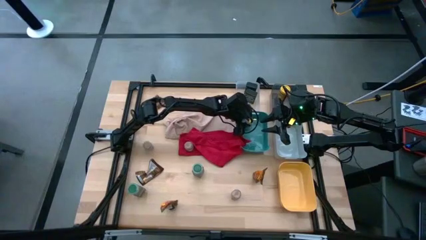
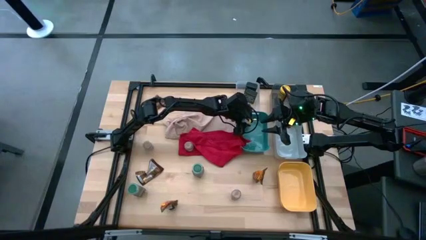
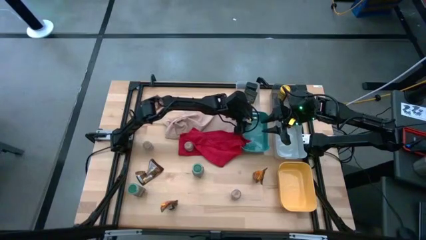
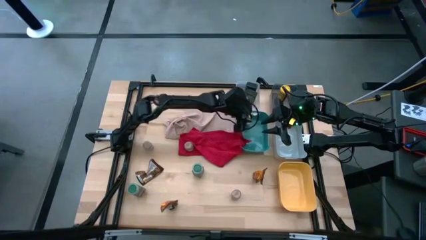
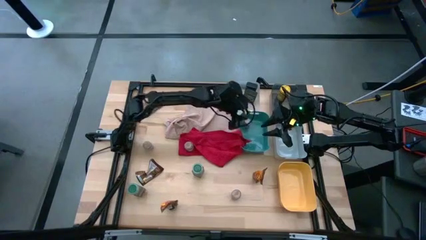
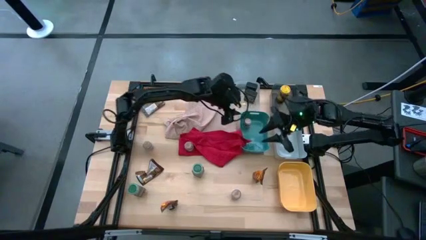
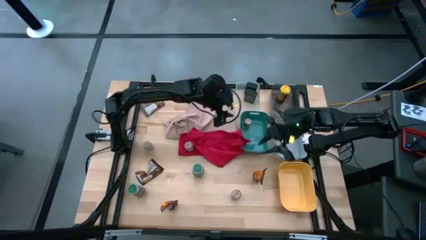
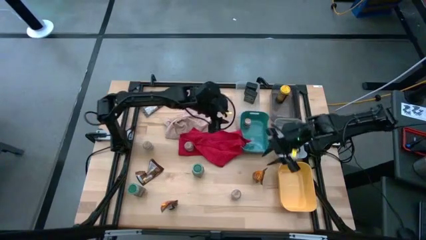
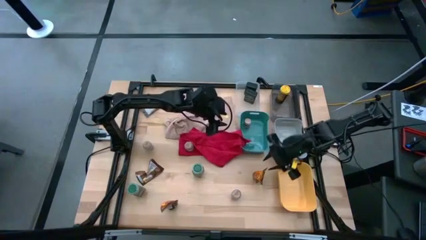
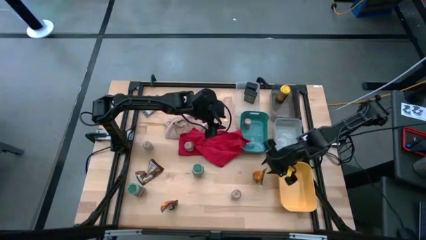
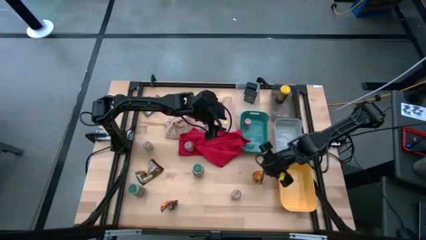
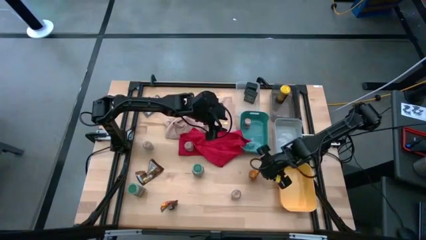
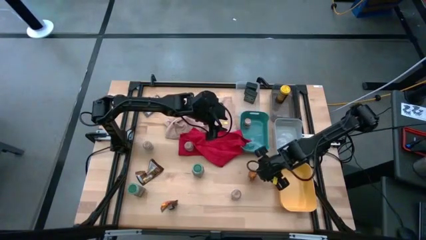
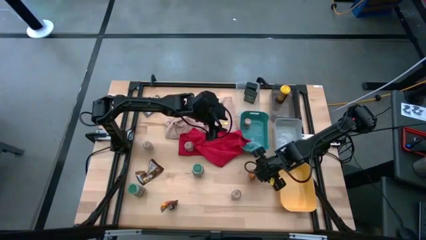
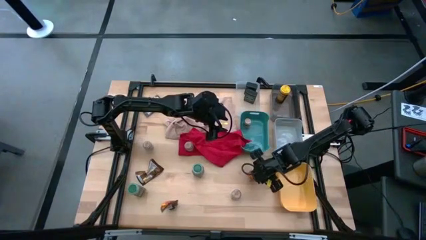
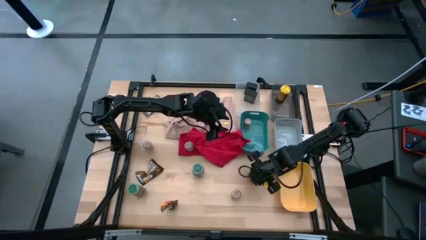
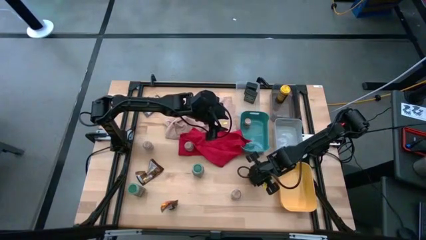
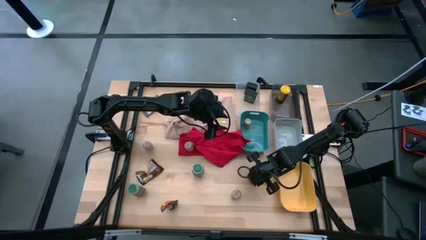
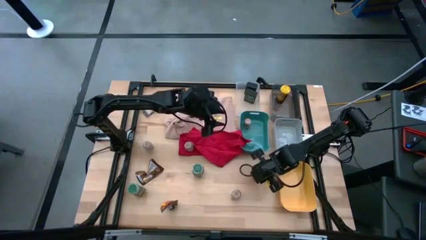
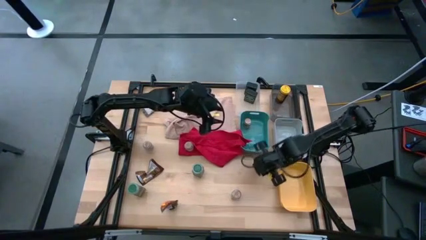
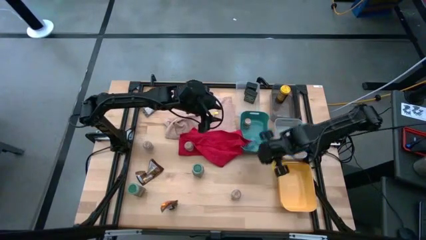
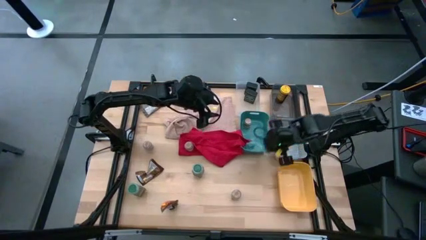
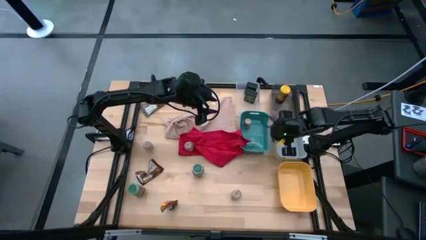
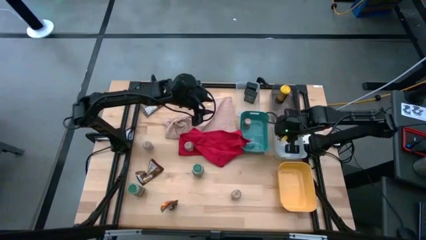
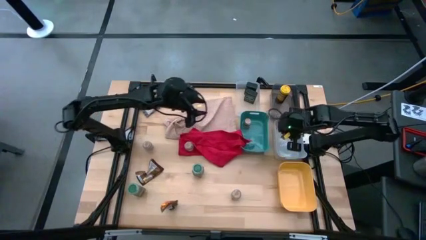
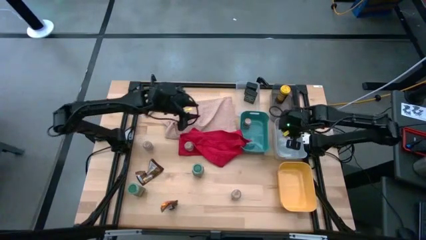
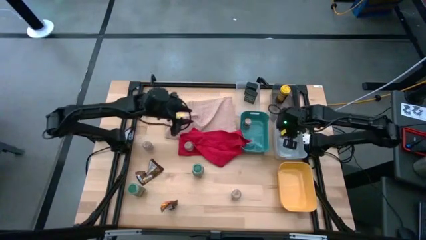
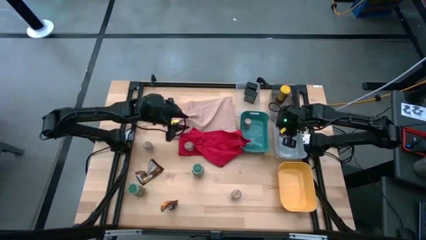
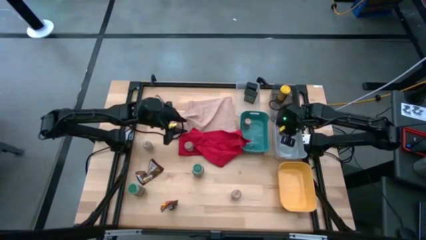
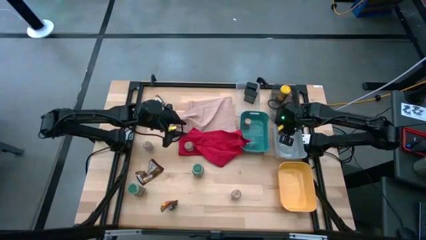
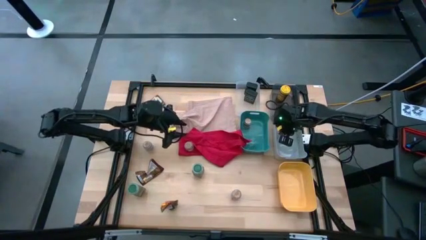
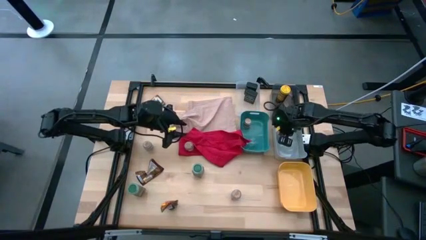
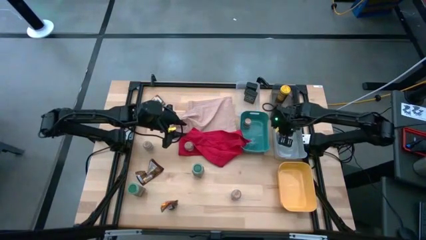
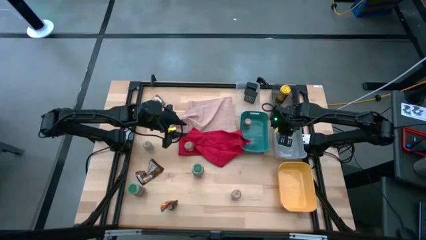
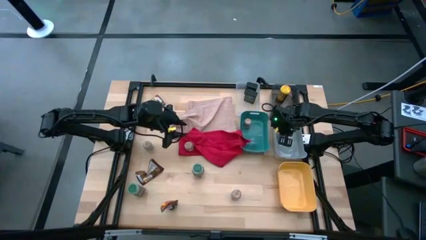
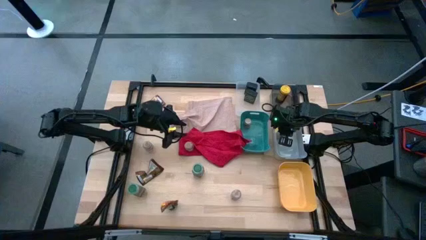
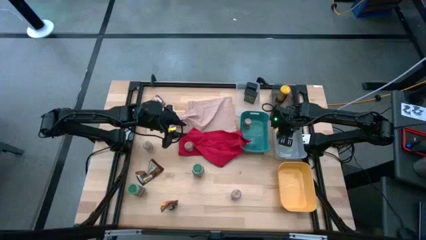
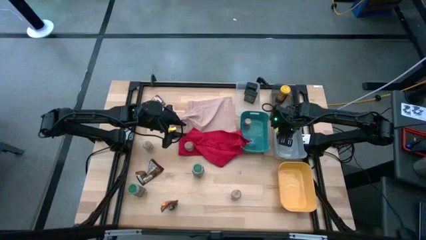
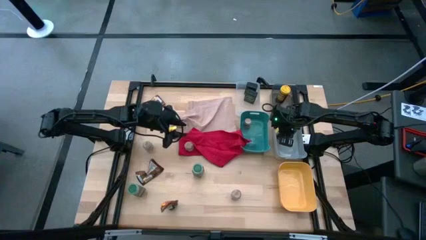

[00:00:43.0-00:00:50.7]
Task: Sort spices by type
Put the right brown pouch seasoning into the light blue bin

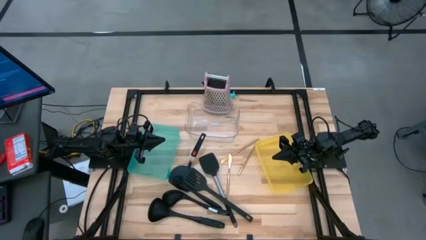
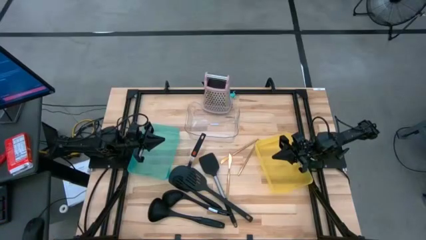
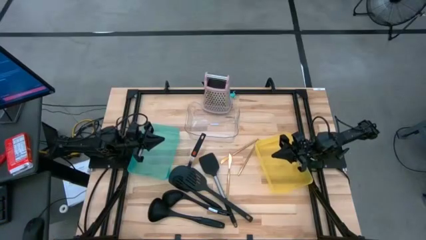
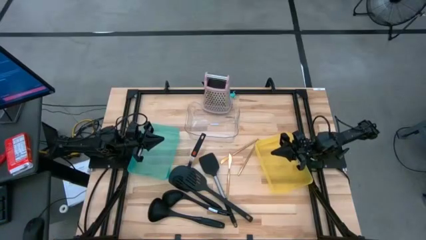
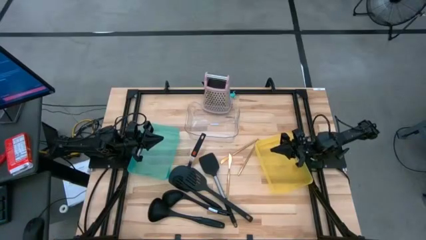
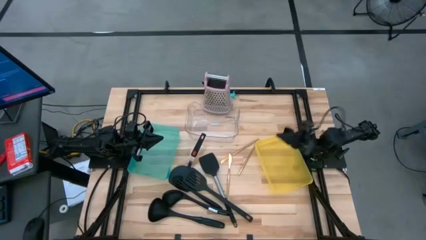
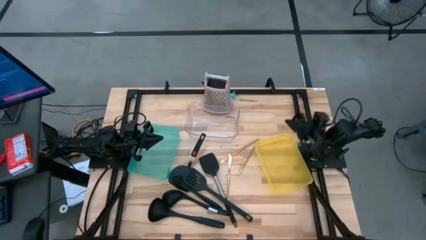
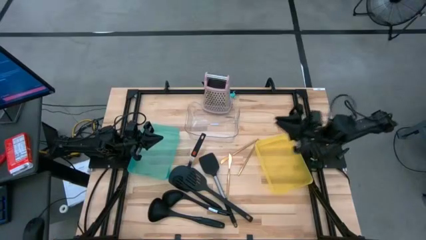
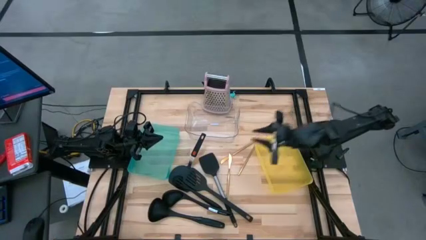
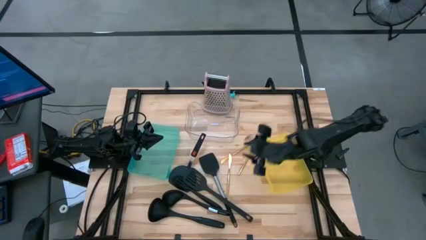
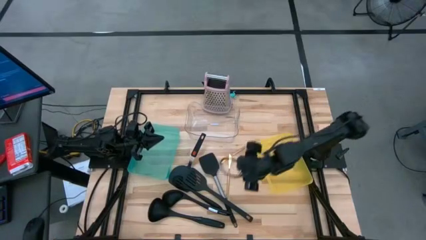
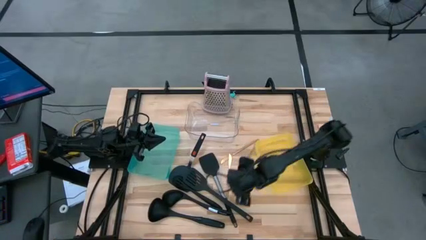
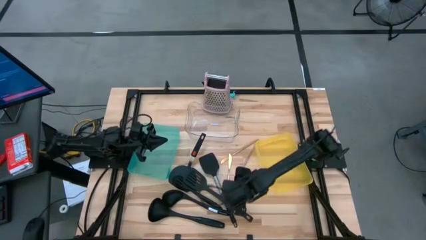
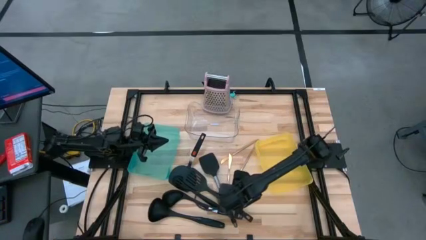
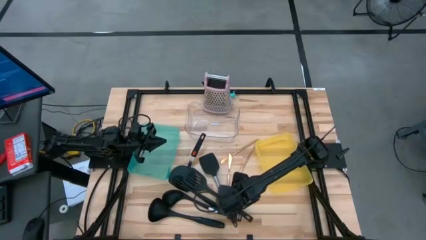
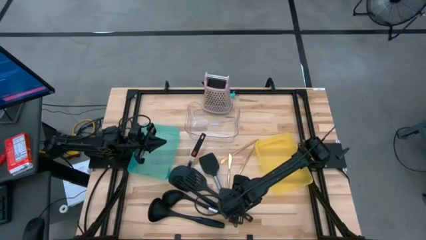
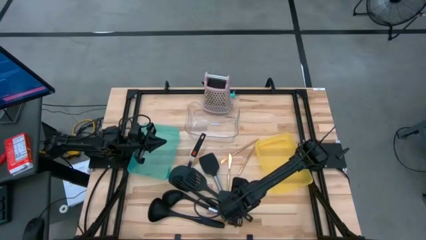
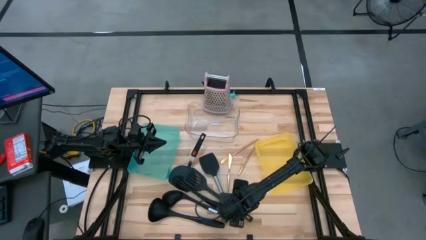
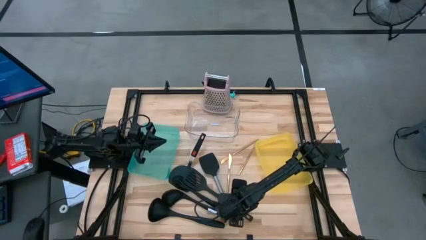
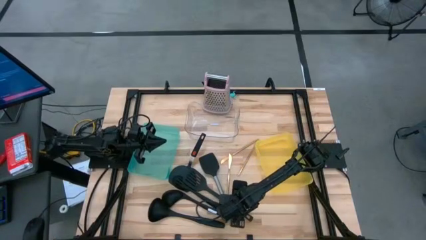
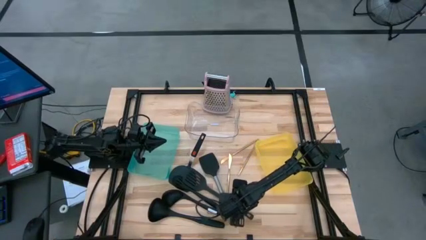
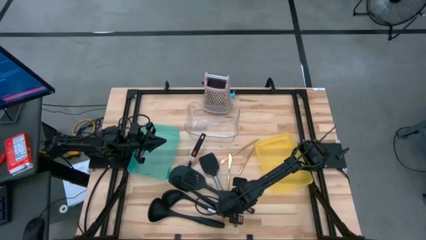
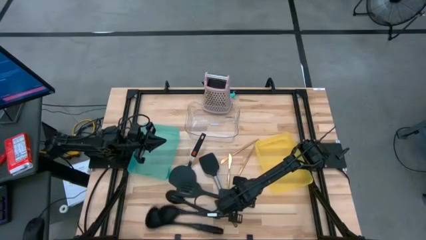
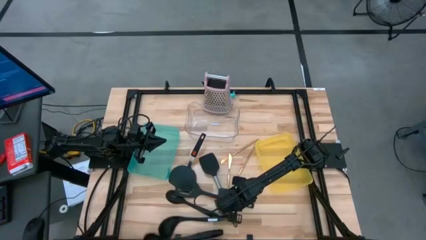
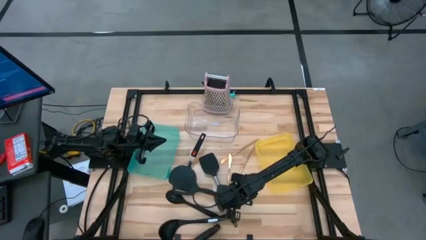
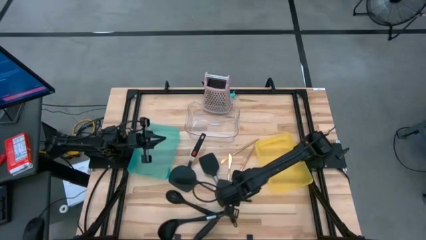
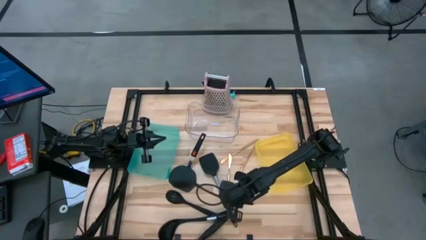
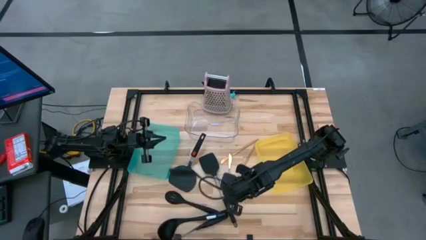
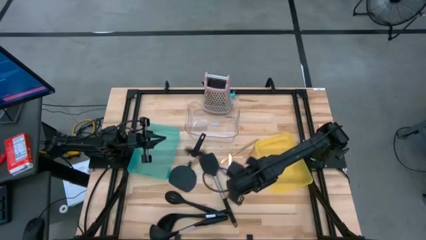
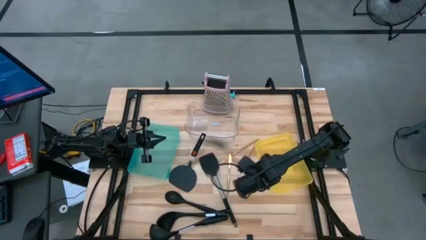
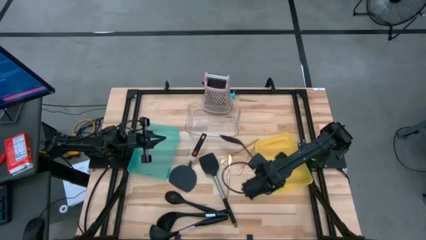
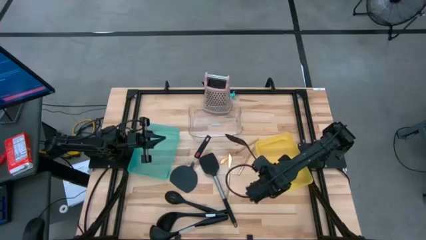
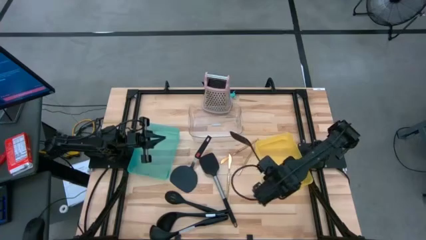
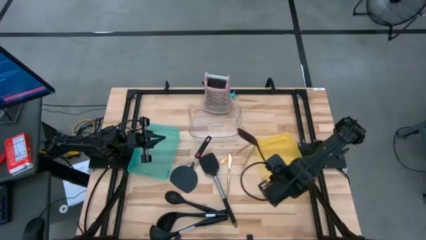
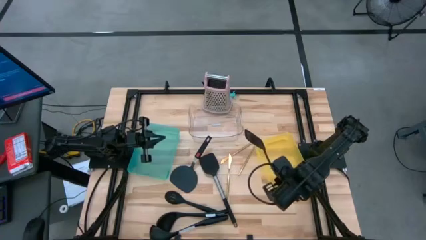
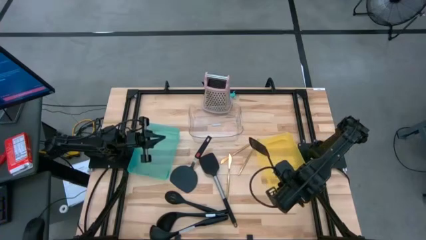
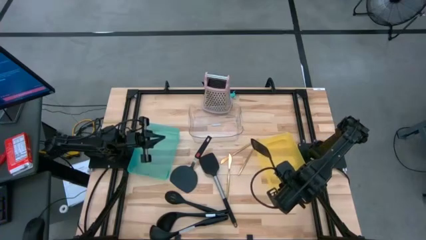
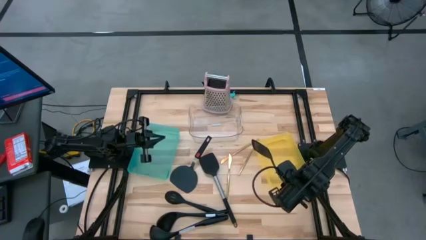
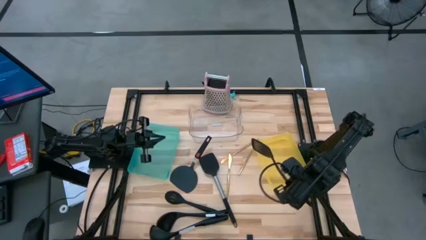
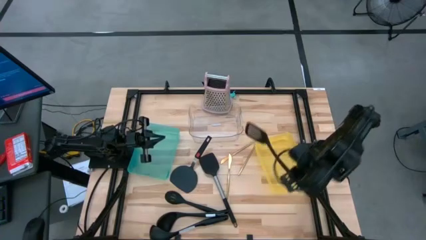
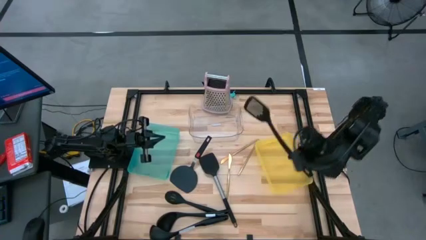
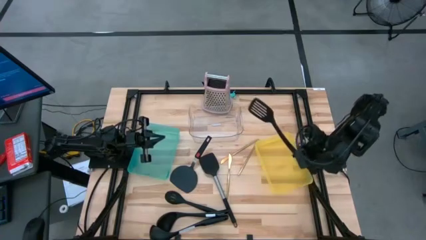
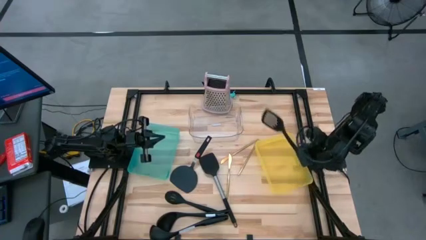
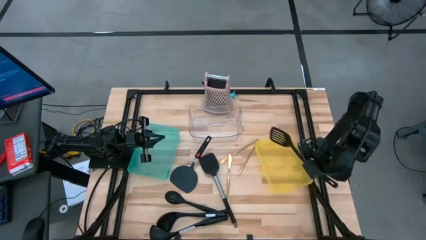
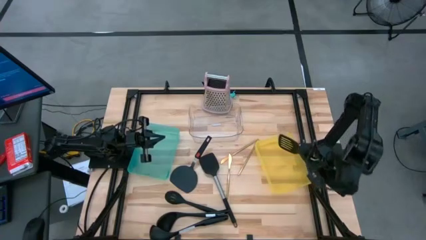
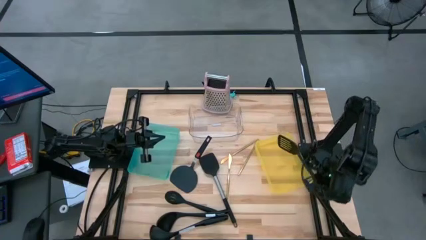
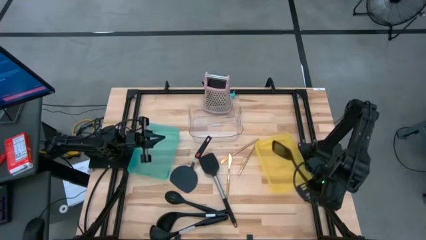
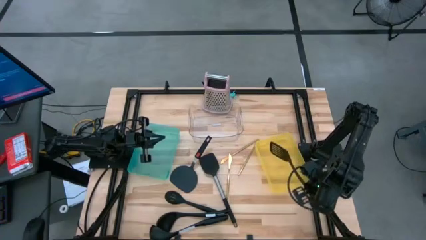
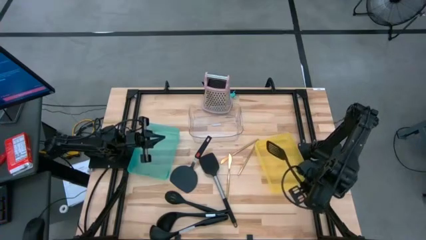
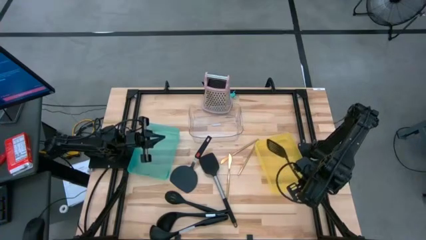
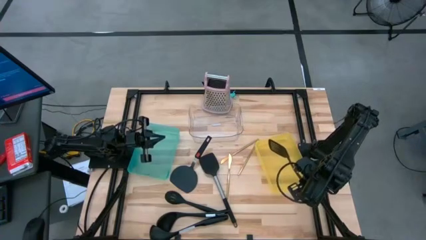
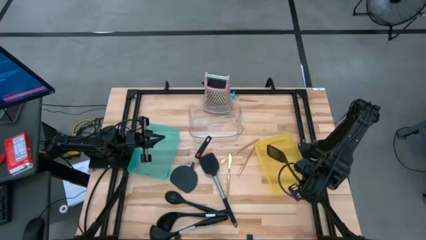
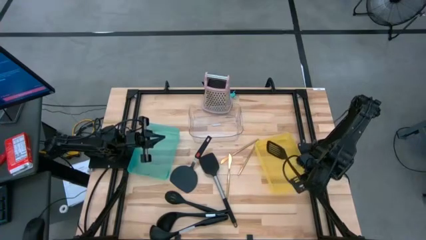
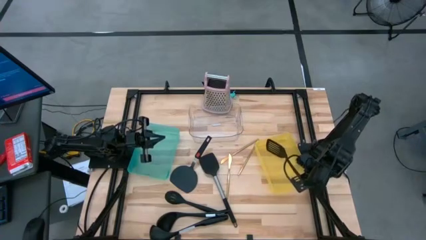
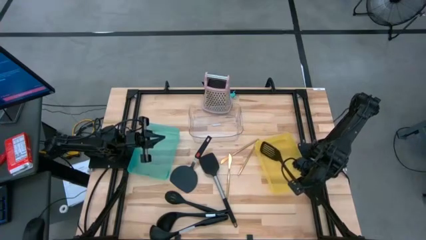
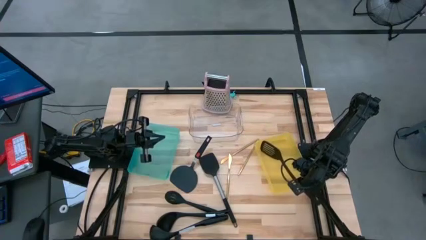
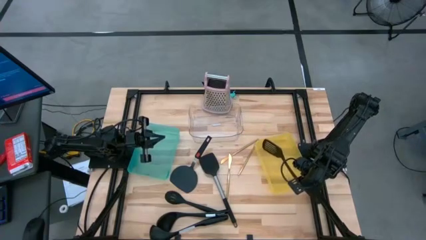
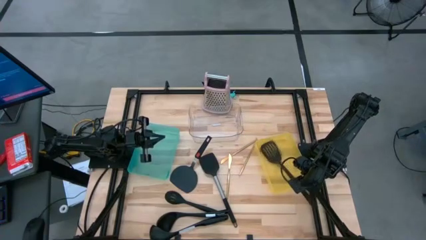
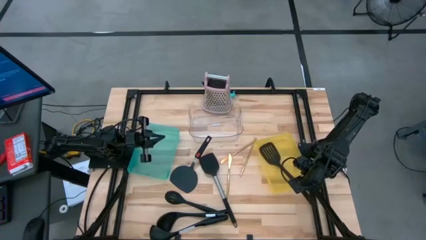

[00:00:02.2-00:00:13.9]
Task: Pick & Place Kitchen Items
Put the black spatula into the yellow bin
